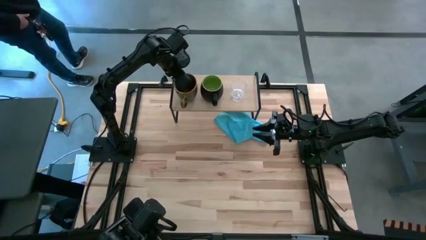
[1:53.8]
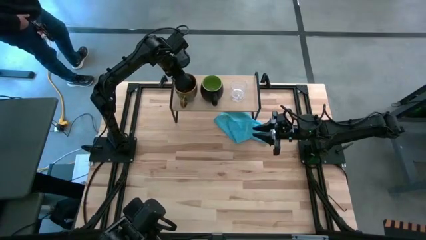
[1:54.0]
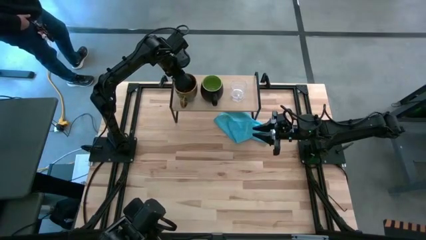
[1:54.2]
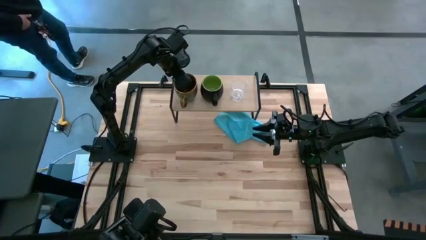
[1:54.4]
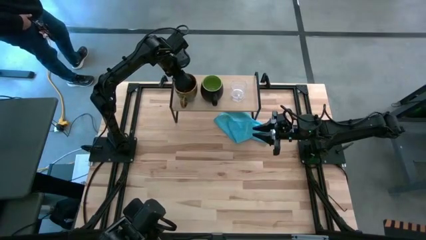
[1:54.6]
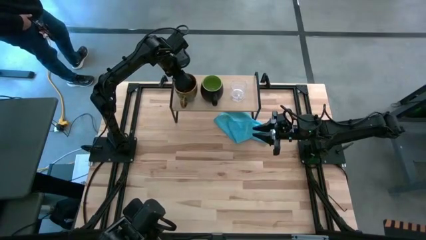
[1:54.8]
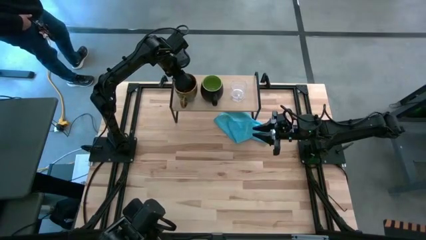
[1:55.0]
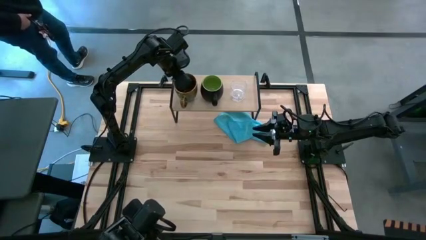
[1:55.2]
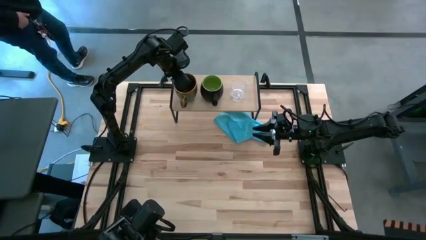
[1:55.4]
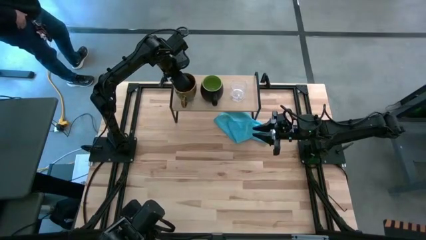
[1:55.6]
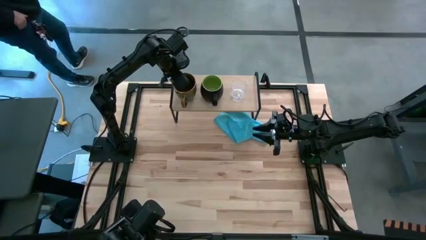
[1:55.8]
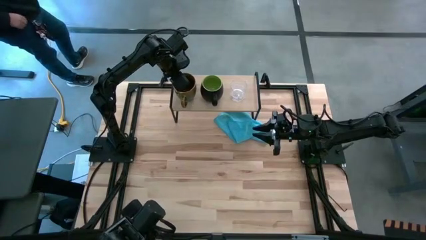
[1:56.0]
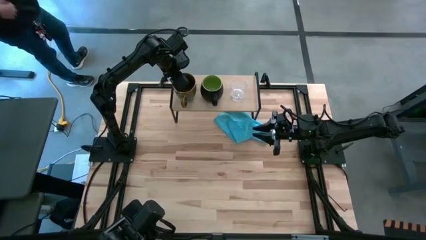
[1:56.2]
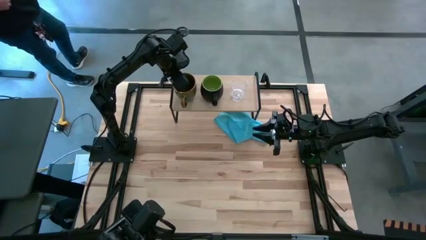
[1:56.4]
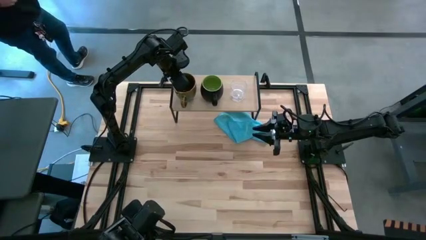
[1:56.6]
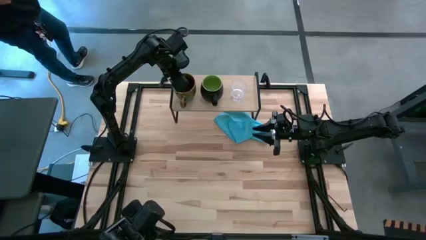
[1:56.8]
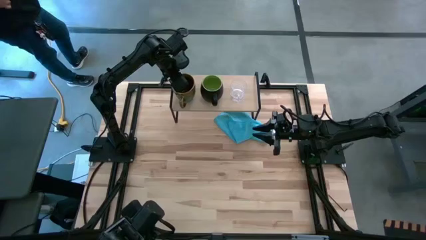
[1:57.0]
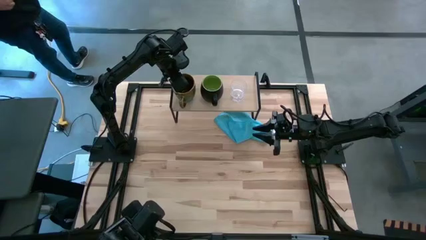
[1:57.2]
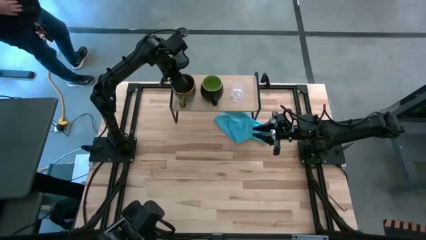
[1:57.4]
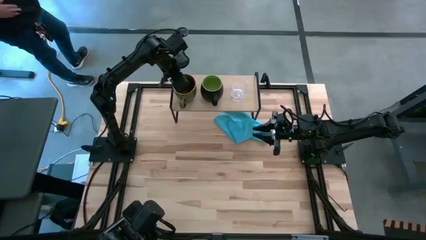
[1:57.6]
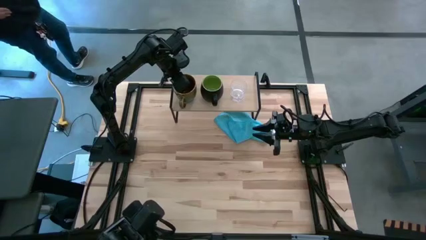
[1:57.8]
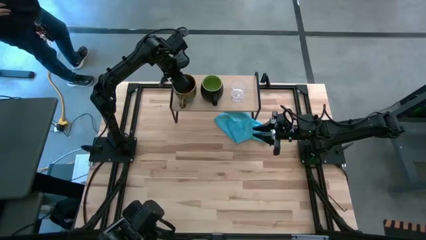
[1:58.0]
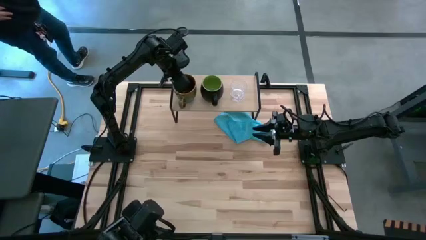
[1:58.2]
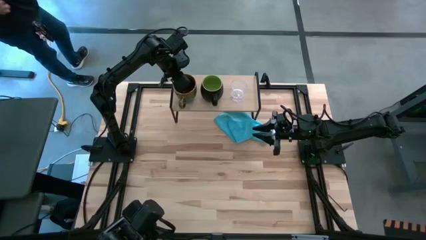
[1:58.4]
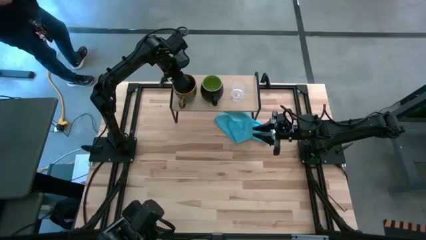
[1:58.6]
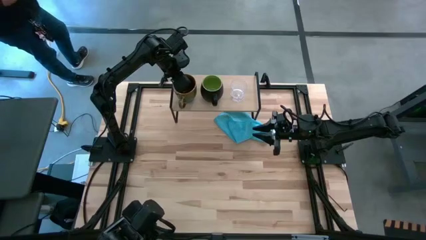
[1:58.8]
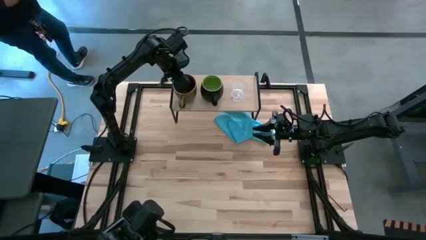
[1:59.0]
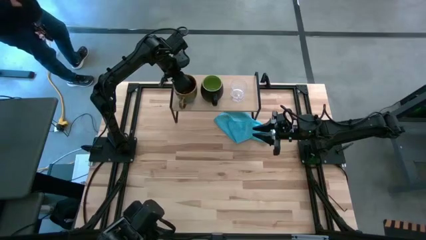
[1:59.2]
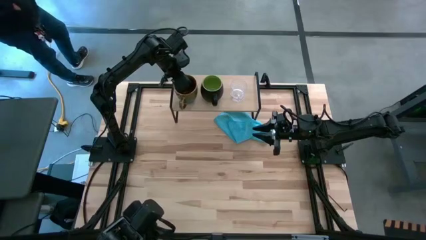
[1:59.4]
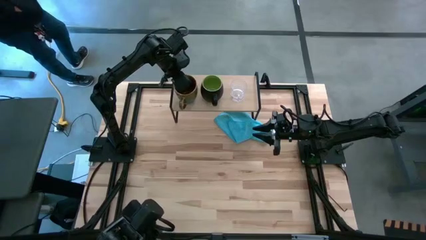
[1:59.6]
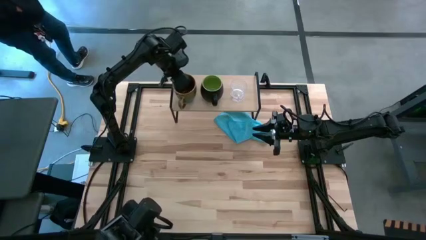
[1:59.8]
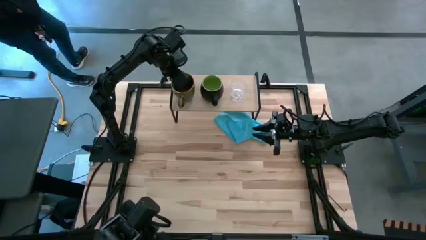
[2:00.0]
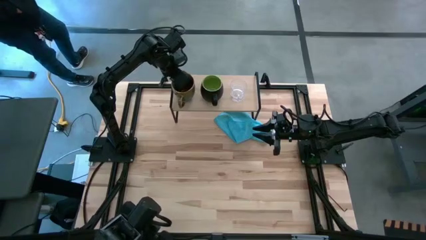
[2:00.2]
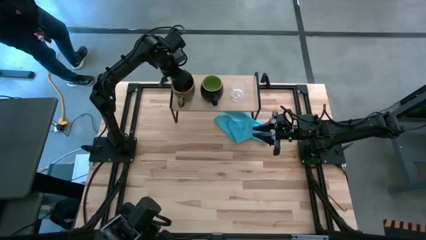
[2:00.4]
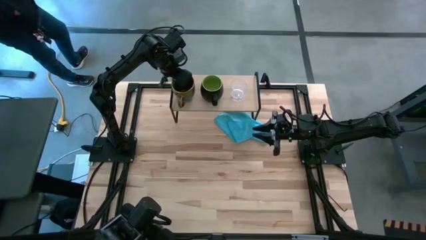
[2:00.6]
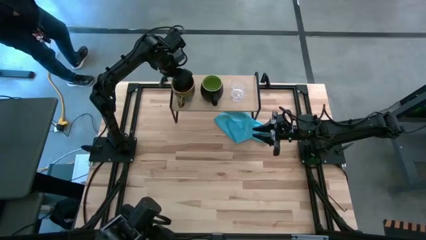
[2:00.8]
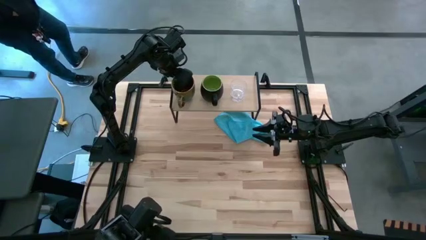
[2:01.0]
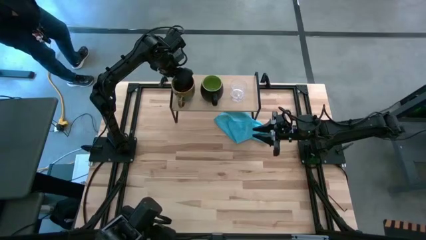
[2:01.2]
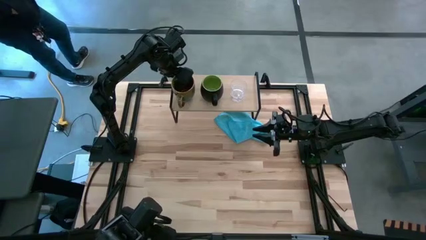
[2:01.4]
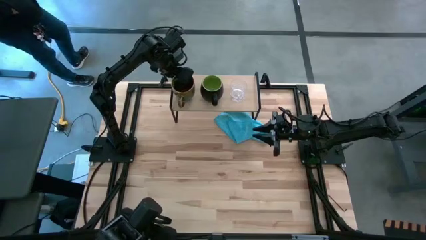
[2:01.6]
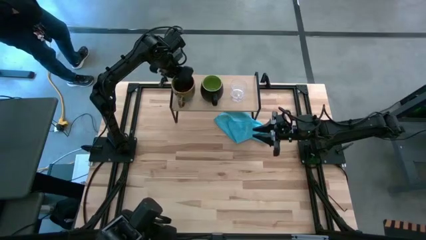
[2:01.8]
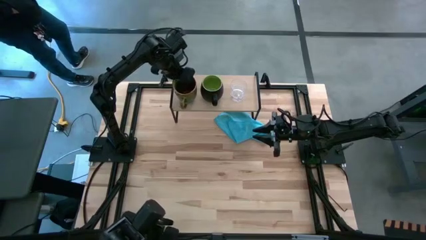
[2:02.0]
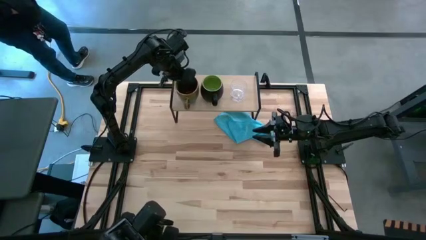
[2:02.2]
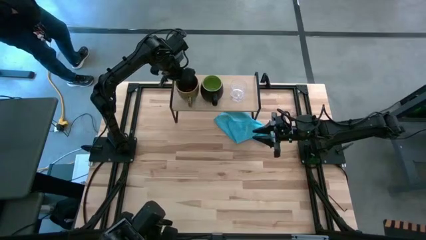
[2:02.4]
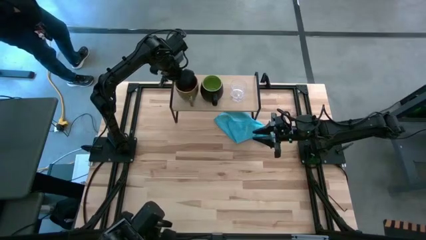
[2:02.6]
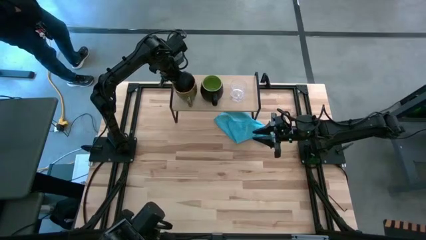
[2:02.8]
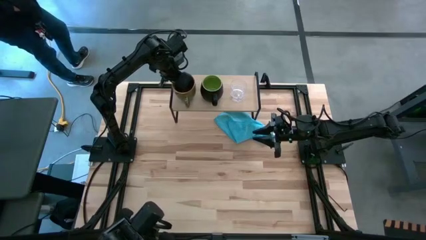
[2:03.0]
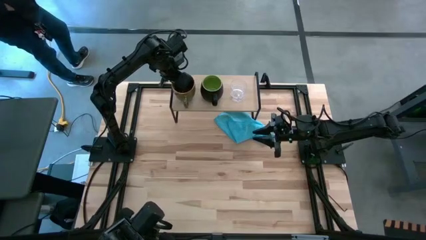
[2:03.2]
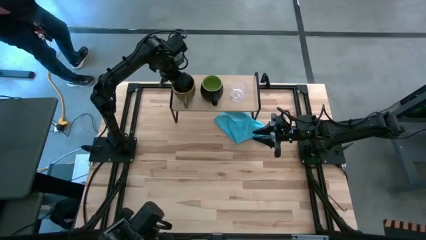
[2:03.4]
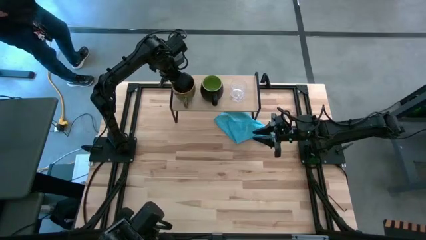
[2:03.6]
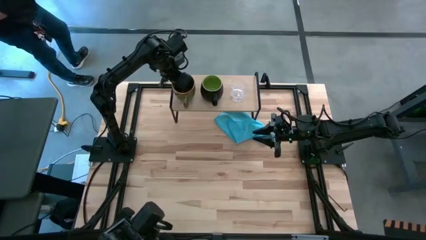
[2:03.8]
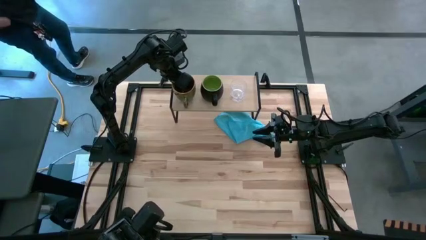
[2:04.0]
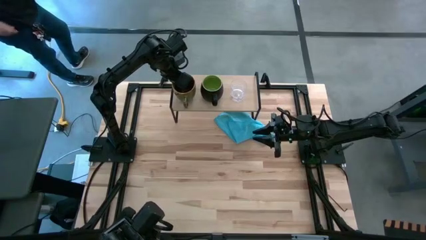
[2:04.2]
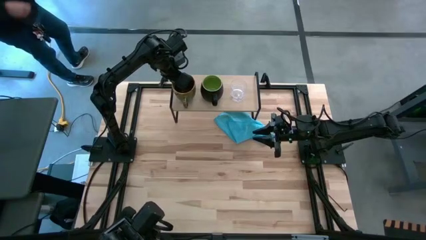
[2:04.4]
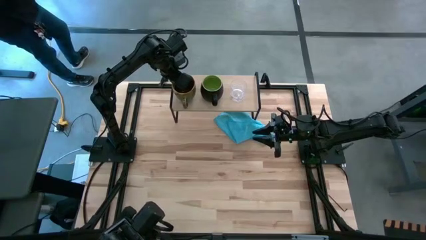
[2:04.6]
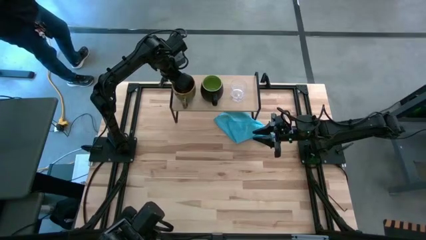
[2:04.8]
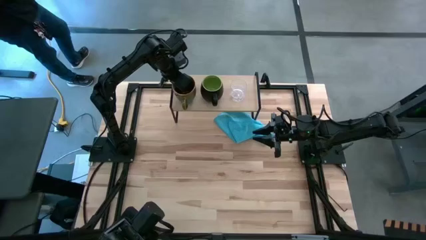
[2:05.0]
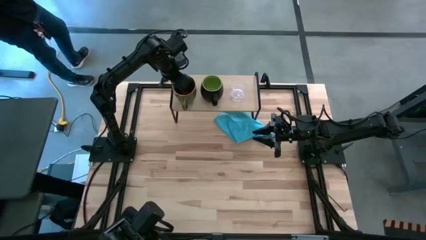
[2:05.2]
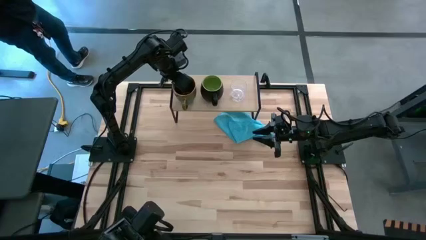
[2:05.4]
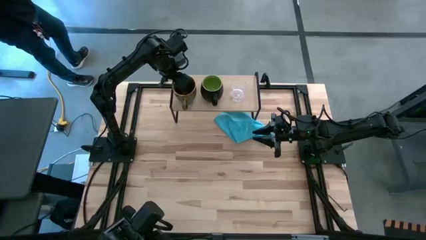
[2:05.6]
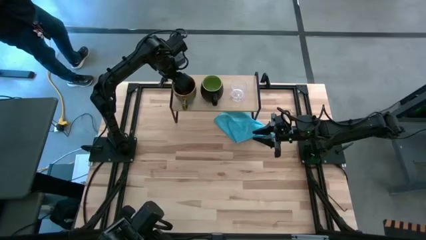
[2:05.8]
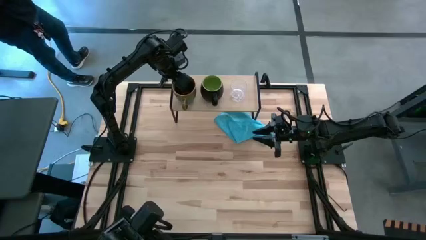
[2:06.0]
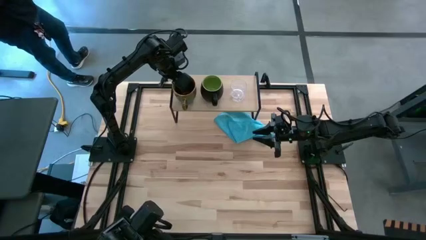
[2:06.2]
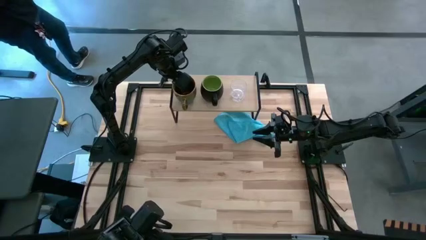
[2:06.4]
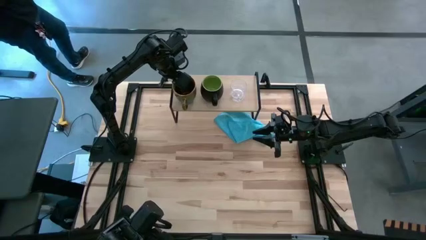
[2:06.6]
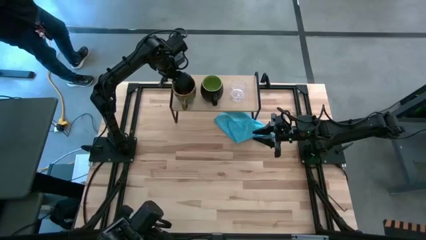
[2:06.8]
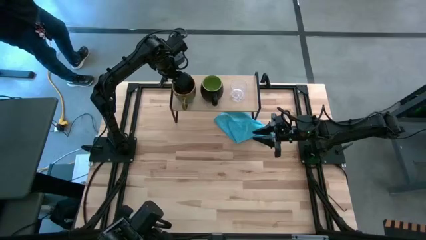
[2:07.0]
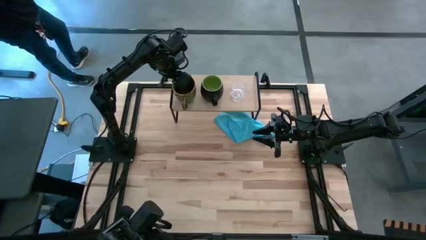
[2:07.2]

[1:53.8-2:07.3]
Task: Stack small to large cups/mugs on shelf
Put the green and blue mug on the shelf

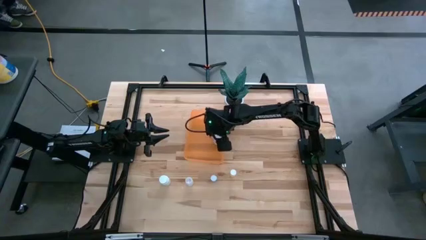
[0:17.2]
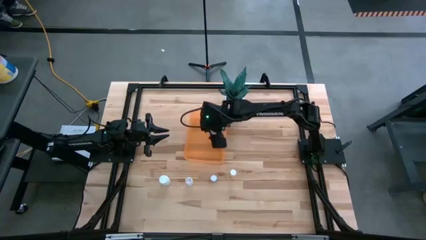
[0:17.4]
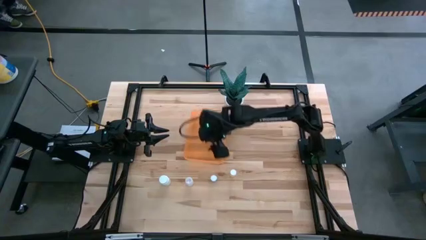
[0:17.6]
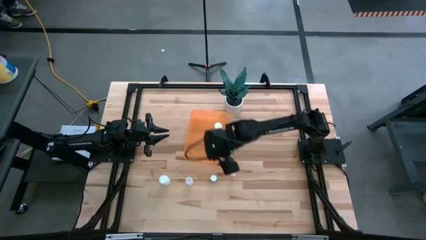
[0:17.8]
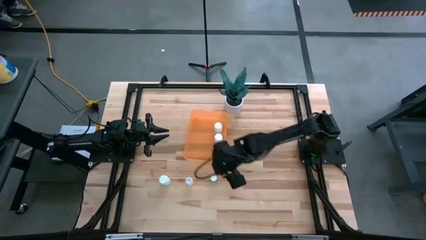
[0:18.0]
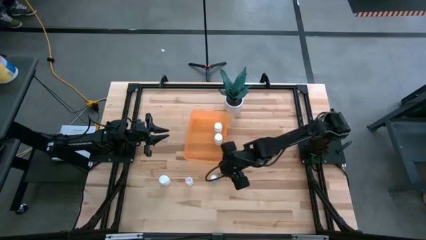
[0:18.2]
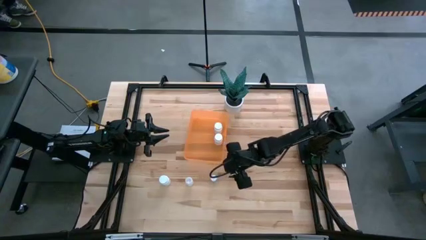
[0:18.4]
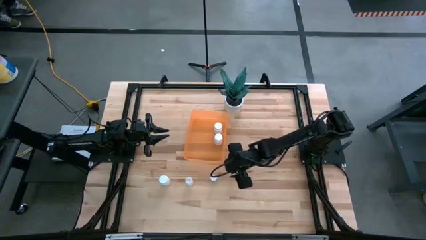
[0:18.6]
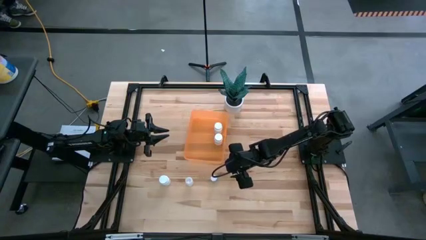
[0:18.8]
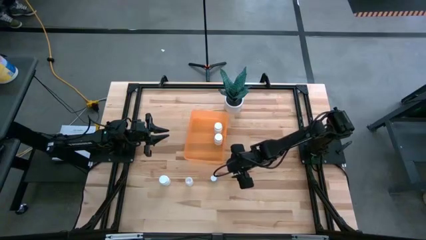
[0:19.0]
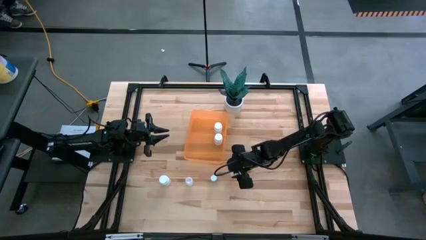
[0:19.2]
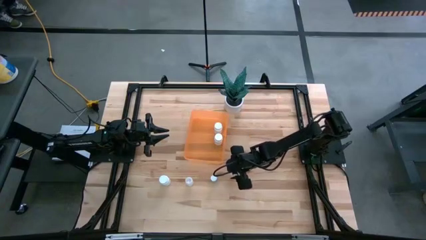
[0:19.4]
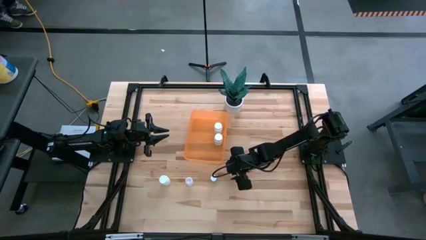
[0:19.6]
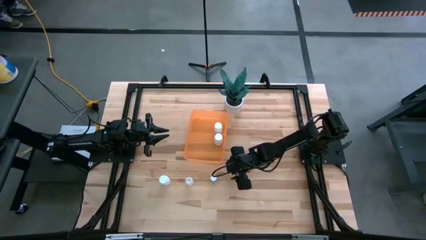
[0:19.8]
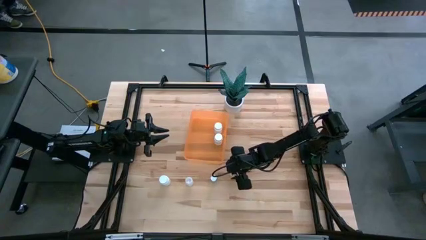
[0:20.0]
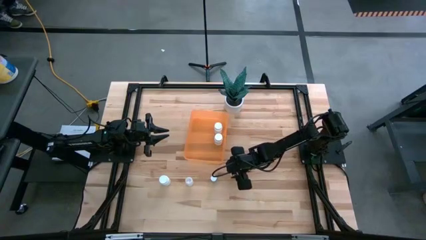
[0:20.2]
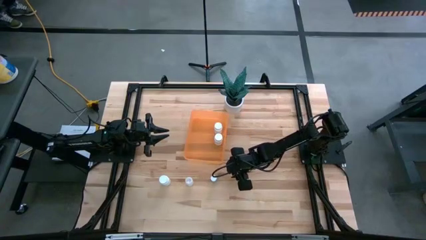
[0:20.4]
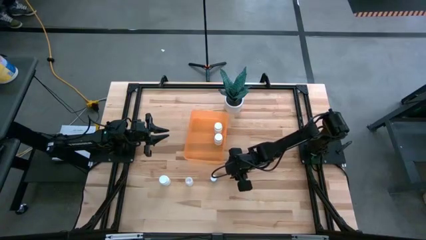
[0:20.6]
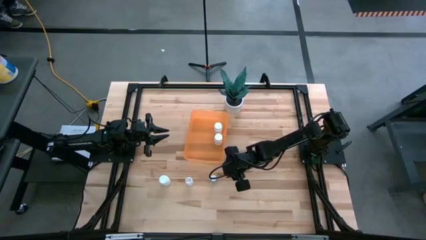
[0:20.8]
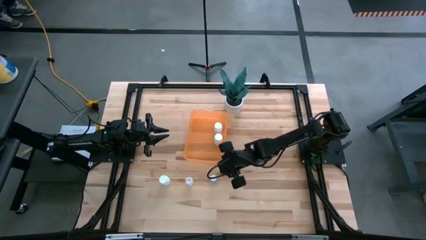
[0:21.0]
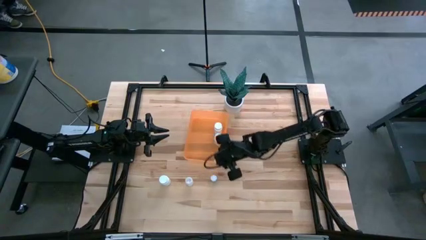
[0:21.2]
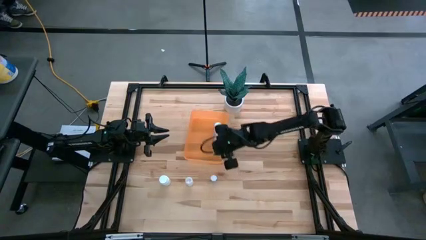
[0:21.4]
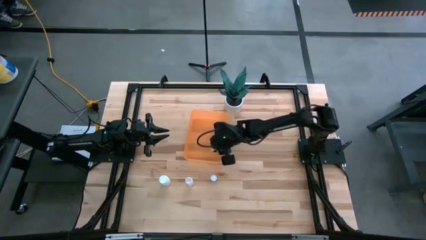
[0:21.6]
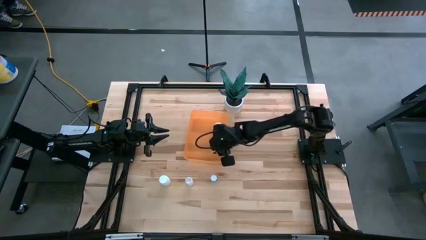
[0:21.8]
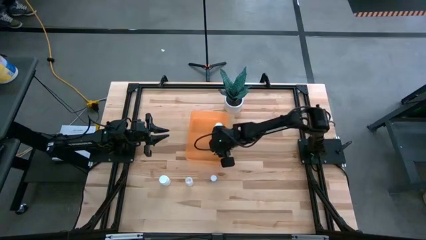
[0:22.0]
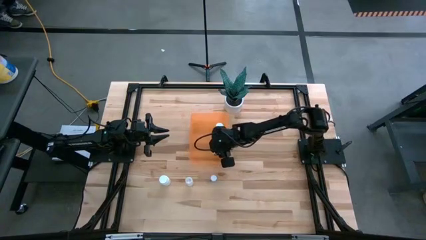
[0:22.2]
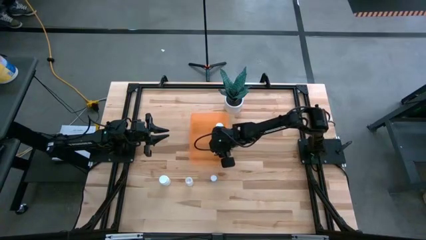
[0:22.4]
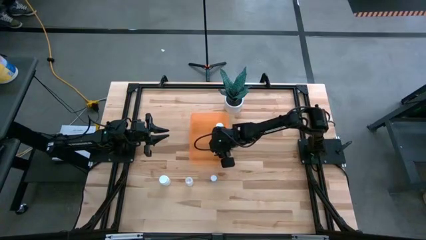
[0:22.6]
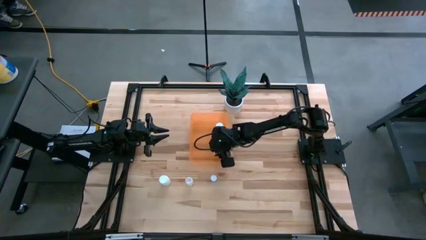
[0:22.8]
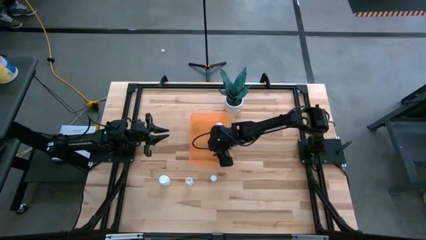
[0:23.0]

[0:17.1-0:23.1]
Task: Pick and place pill bottles into a basket
Put the yellow pill bottle into the orange bin
